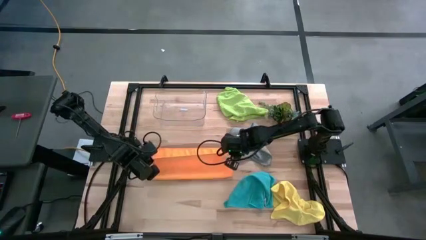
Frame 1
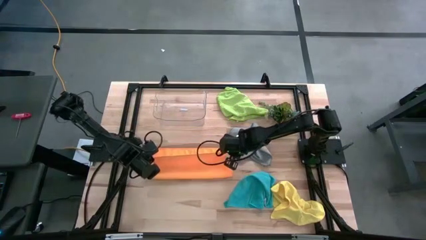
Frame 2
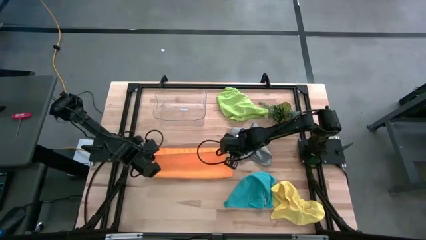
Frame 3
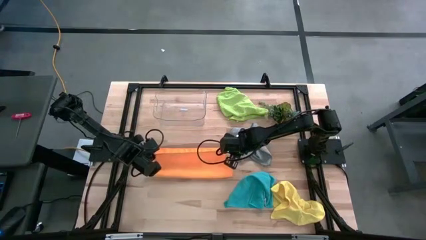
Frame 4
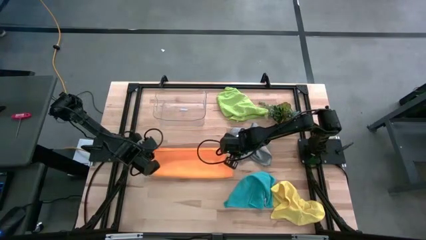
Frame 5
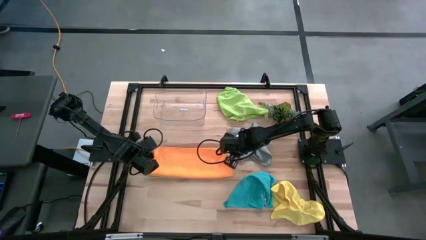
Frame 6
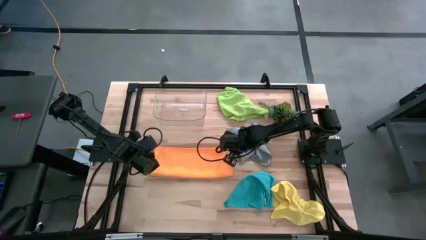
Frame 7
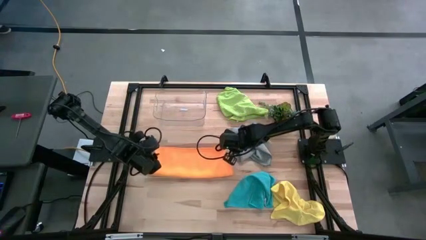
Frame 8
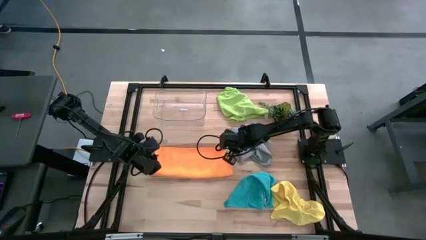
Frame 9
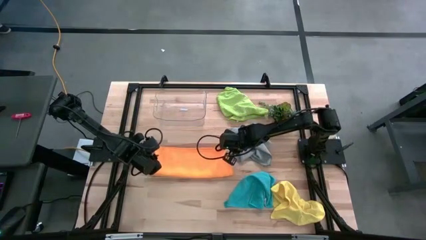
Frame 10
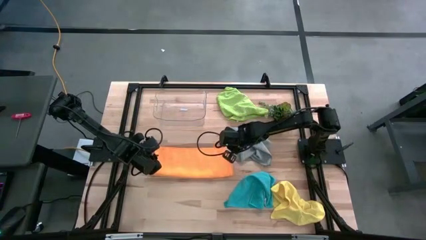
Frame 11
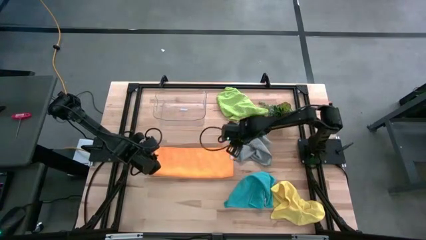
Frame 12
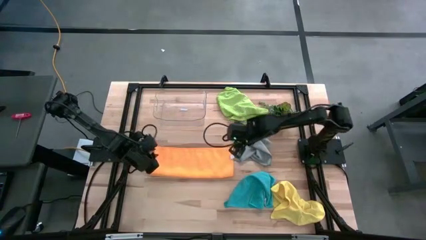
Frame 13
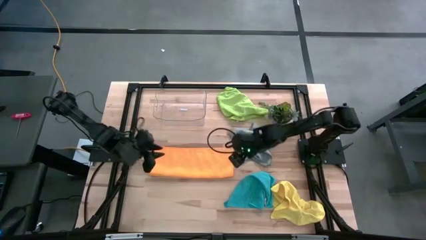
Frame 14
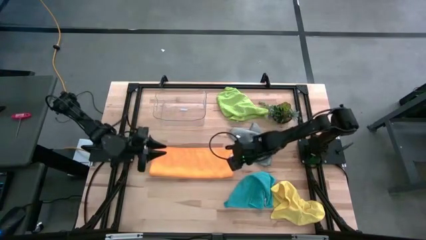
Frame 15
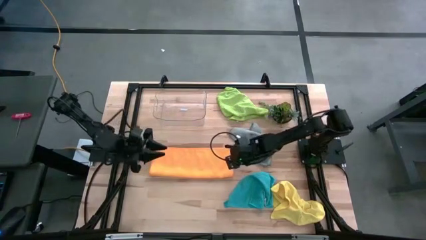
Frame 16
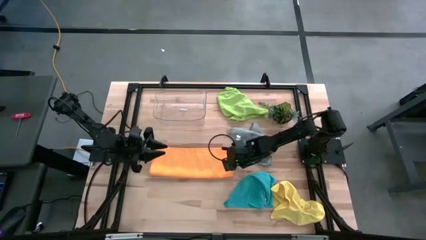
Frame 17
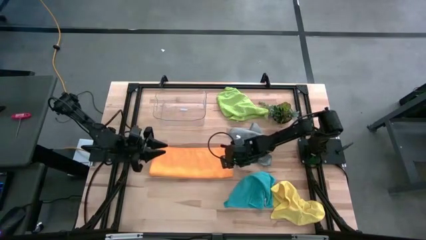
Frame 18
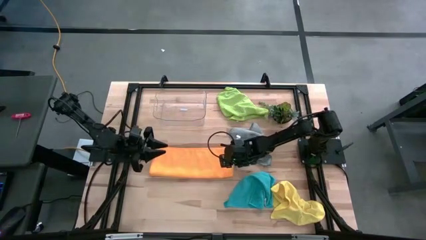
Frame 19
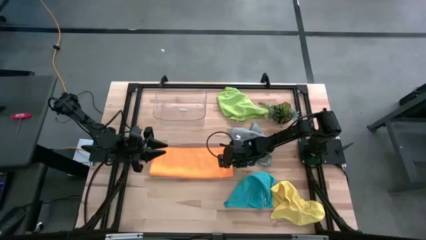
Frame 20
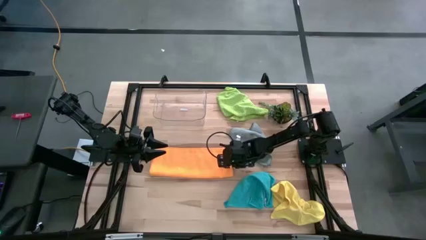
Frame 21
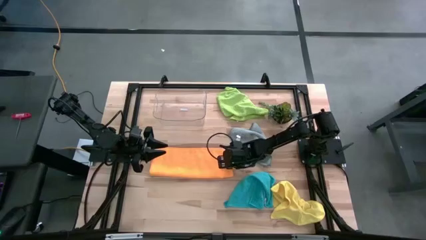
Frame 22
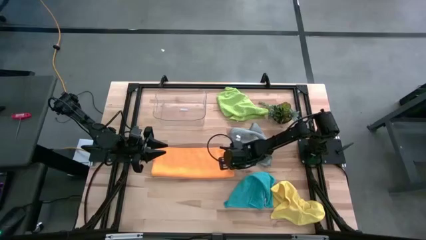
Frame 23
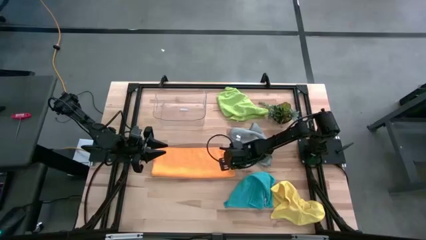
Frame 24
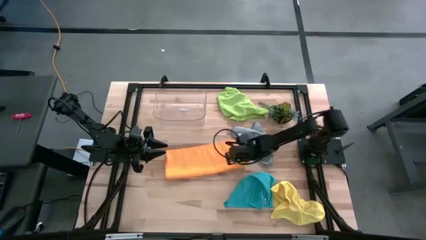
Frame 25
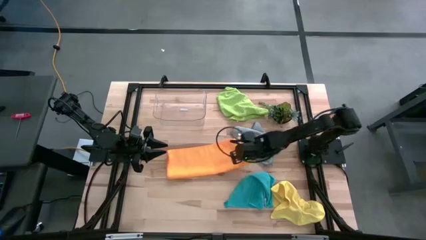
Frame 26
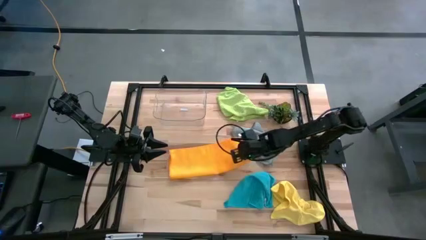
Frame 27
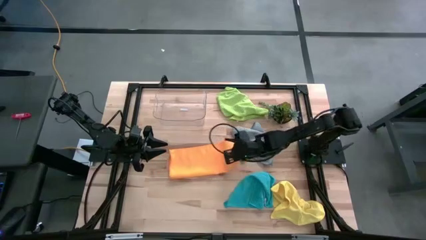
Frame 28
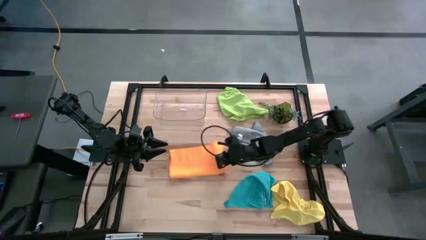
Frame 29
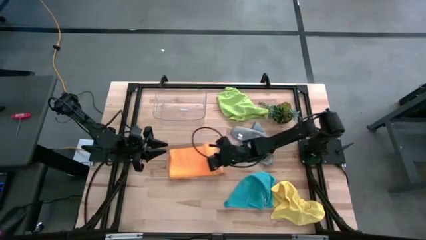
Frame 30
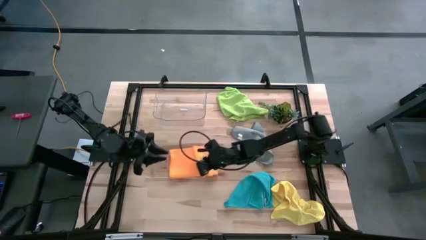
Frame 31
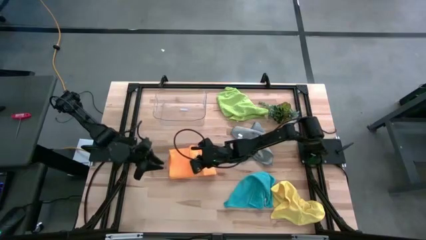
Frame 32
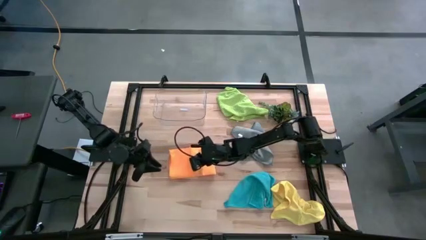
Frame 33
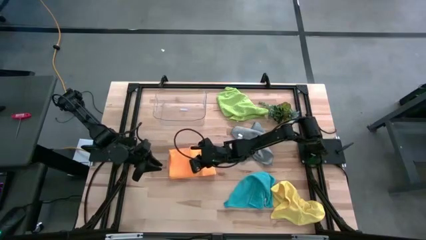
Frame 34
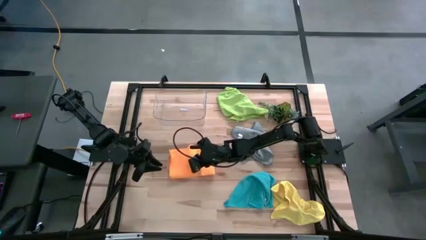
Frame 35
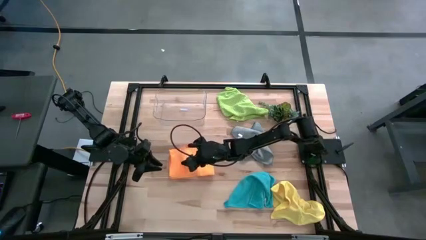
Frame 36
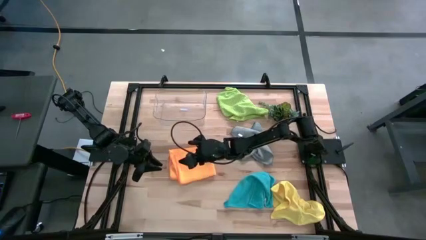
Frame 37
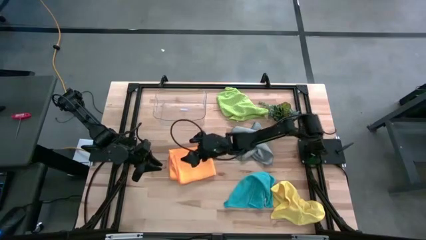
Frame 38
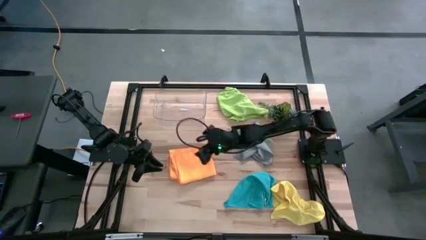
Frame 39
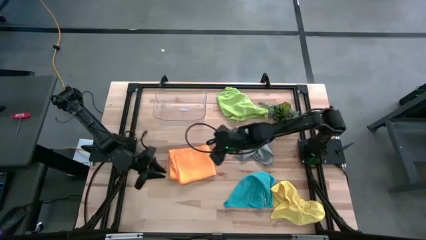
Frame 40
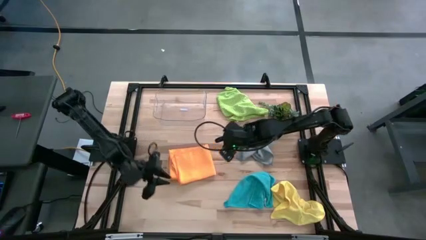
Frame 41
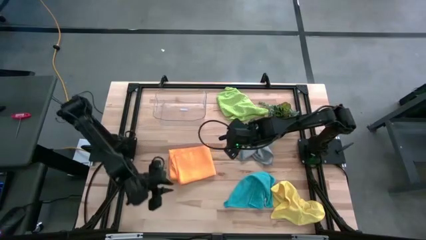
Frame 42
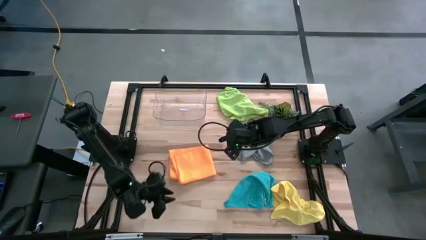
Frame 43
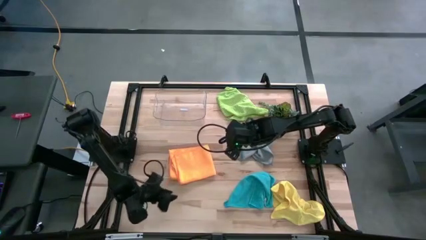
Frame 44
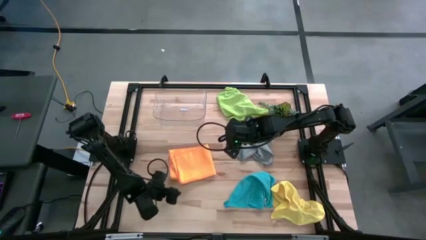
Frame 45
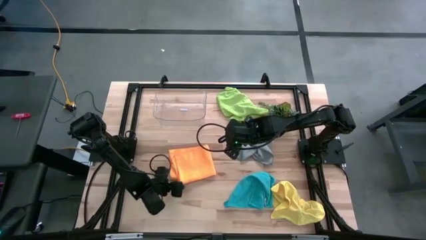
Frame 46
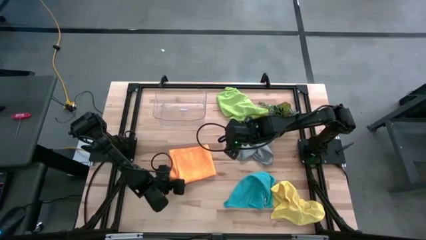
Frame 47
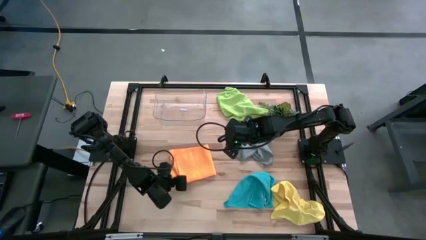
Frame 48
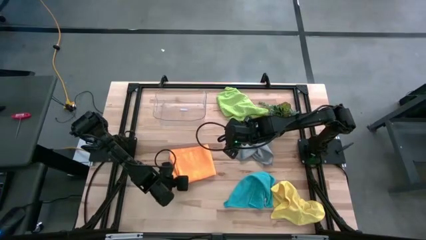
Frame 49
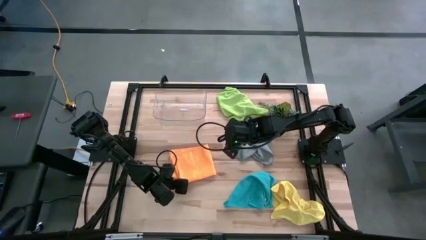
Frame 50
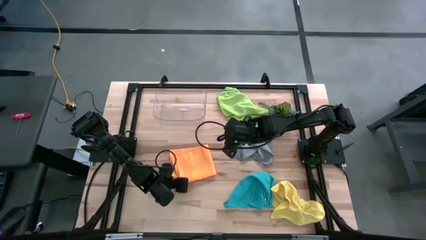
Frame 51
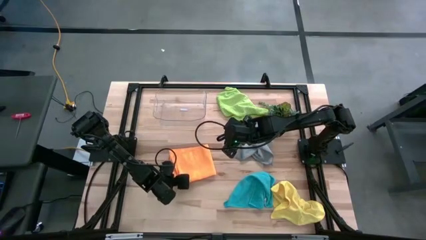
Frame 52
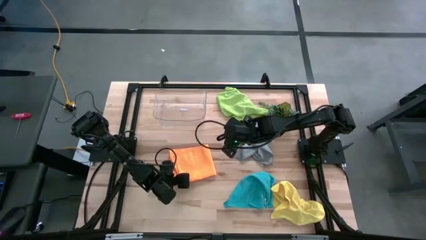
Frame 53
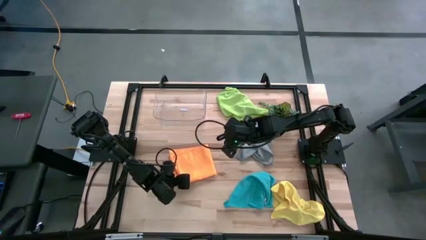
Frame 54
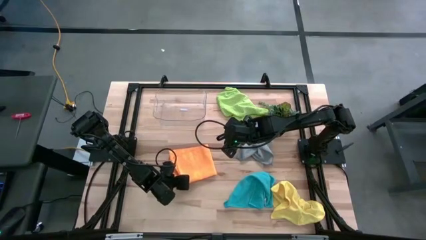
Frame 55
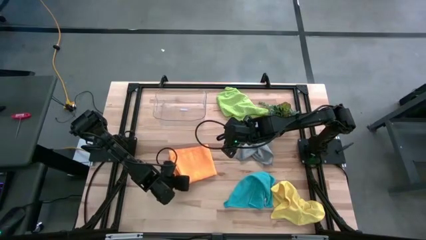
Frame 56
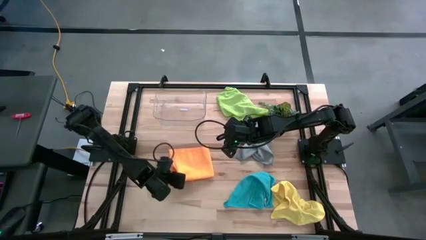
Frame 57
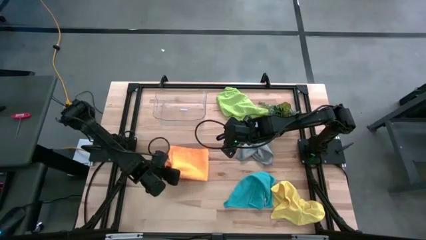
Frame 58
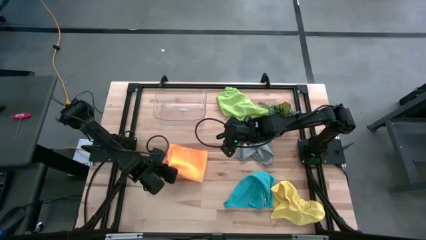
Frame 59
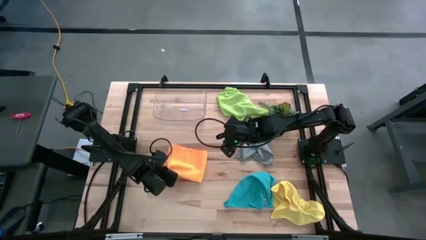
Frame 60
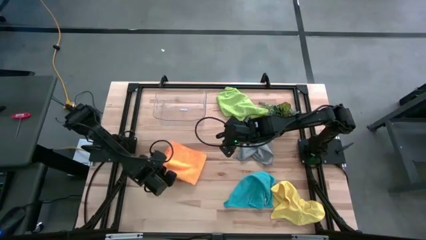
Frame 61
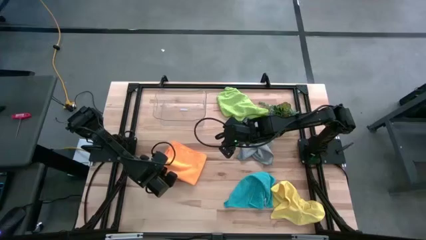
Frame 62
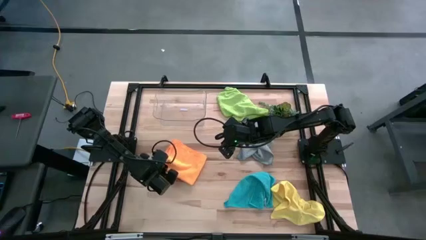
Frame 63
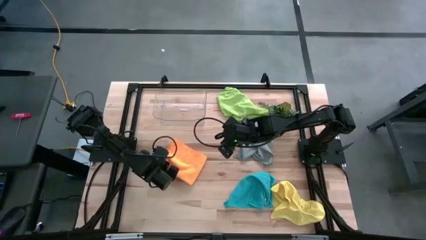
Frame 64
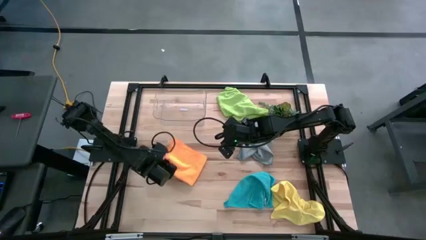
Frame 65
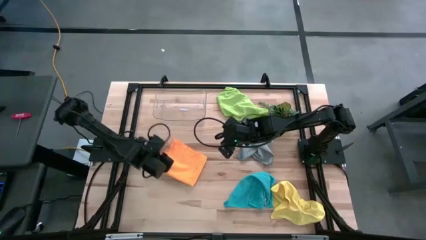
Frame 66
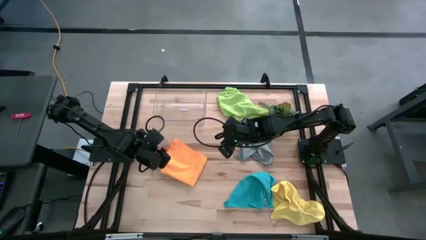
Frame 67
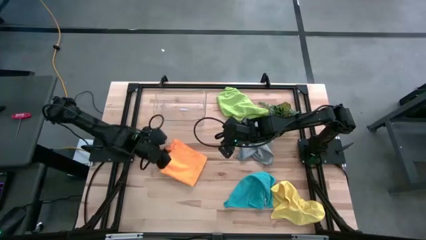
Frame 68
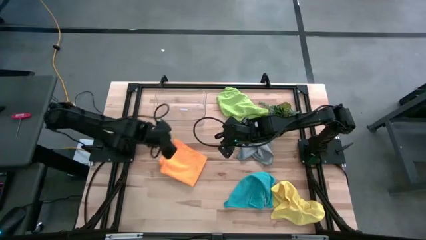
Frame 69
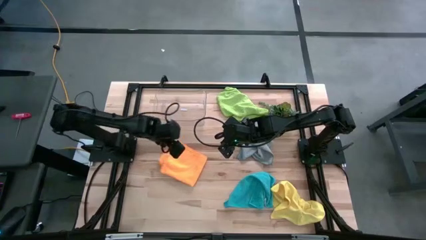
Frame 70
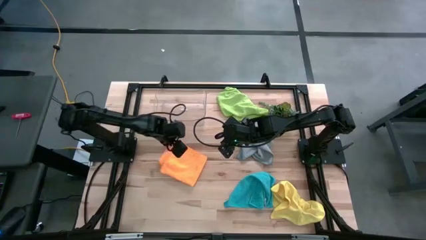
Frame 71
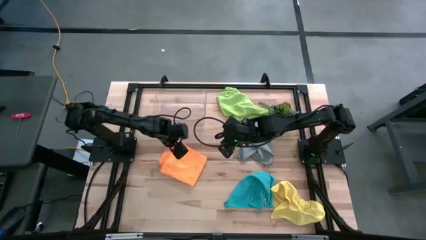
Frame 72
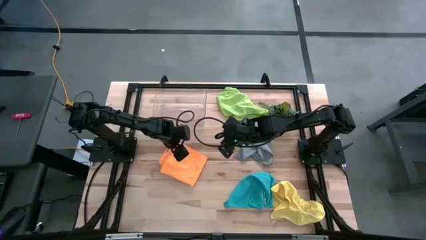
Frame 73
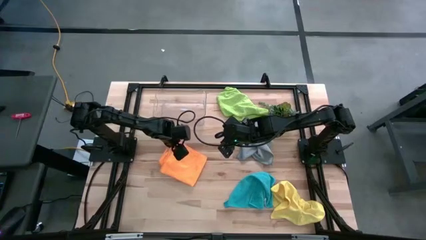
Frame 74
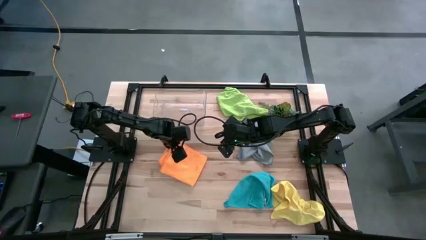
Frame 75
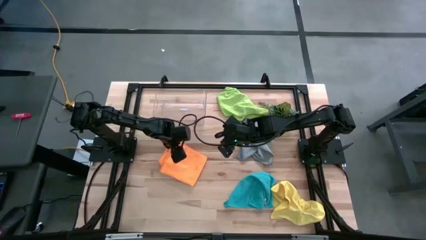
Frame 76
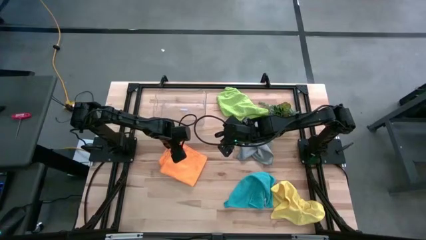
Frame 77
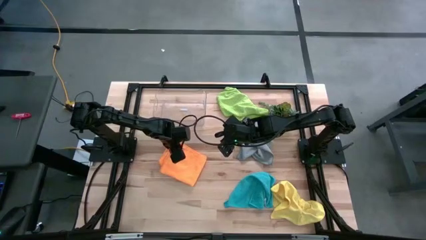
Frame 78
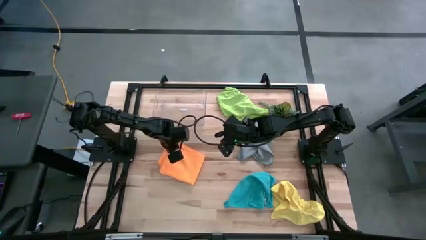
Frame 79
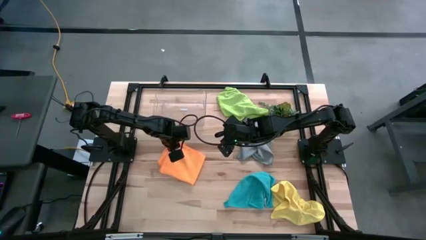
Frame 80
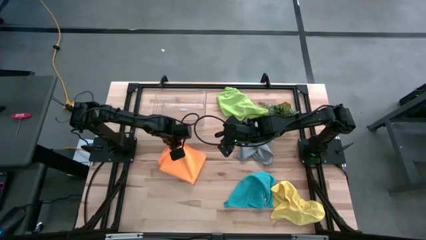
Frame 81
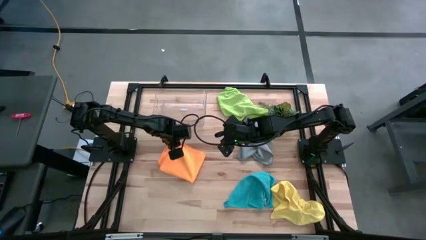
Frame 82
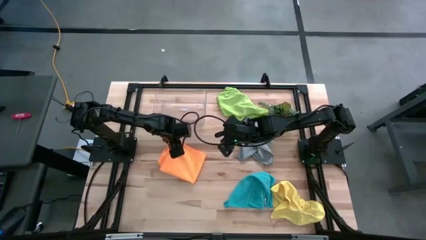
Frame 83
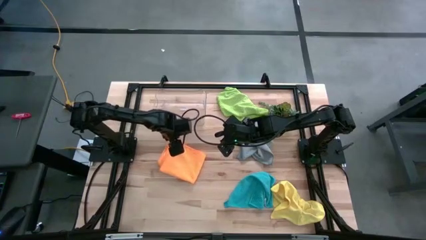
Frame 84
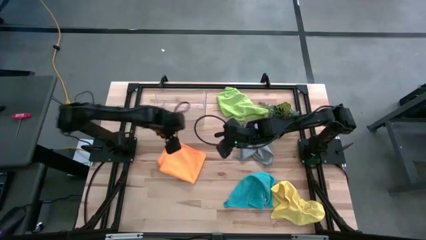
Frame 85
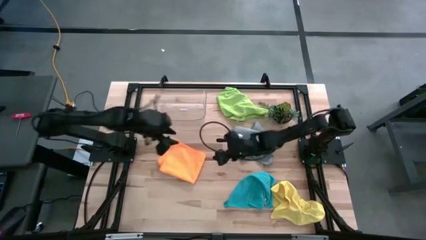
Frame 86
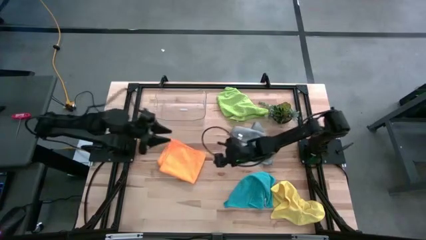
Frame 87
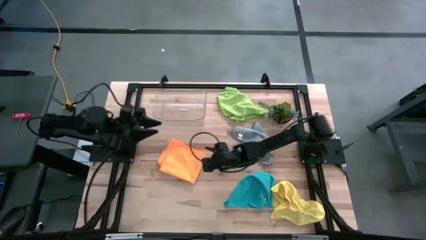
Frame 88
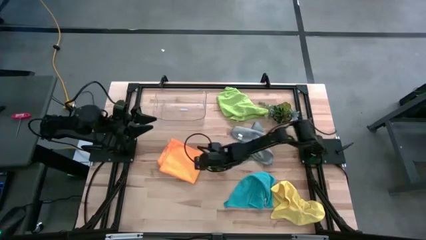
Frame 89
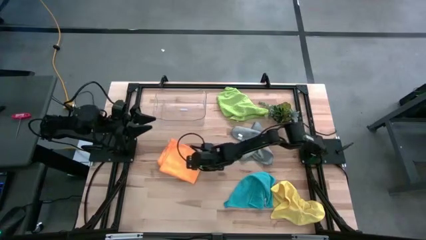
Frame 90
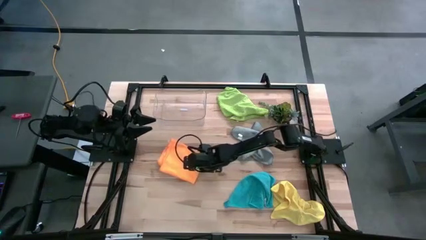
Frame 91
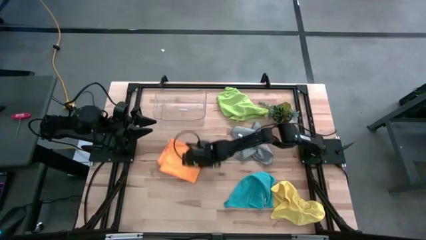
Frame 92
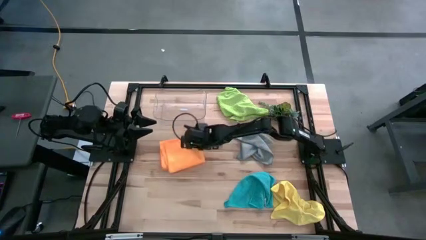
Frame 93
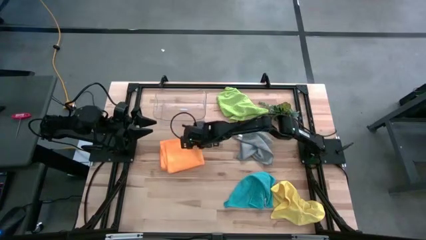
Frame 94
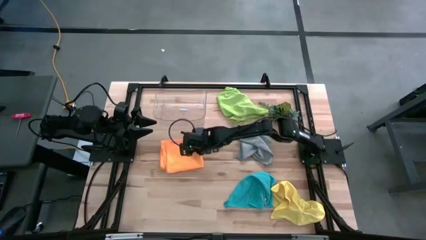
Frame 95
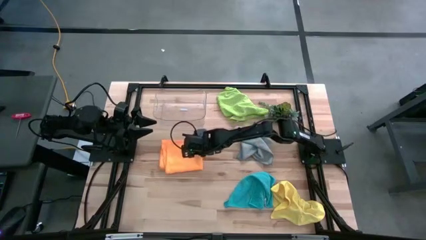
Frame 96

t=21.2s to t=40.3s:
Task: Fold microfiber towels
Fold the orange towel
